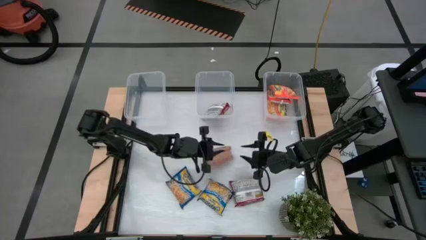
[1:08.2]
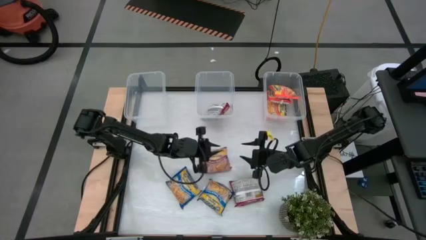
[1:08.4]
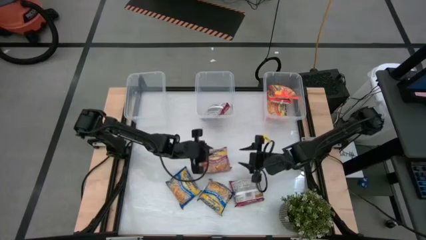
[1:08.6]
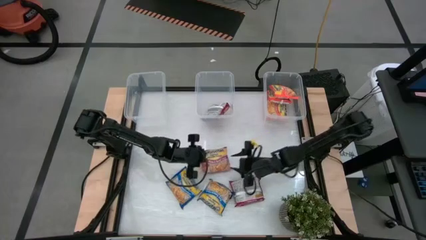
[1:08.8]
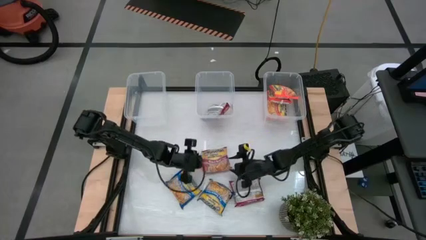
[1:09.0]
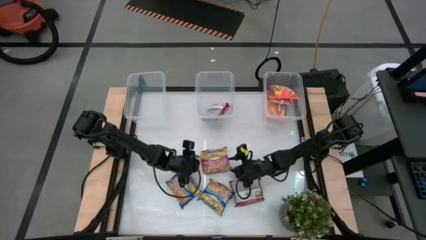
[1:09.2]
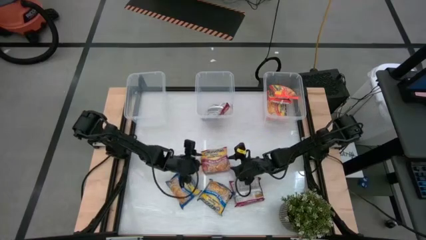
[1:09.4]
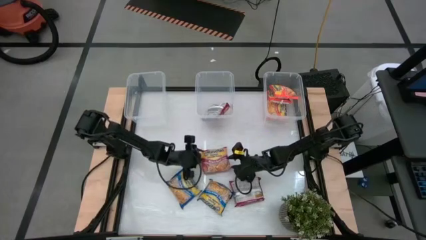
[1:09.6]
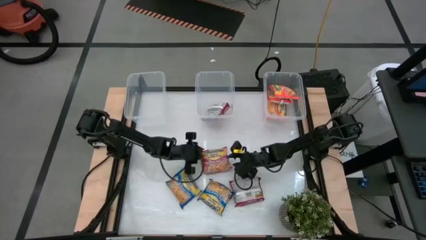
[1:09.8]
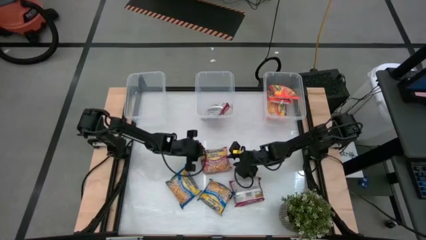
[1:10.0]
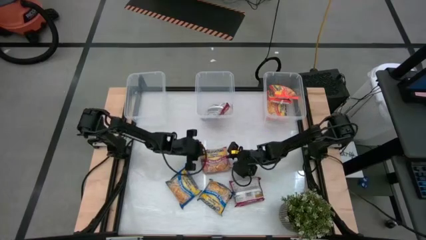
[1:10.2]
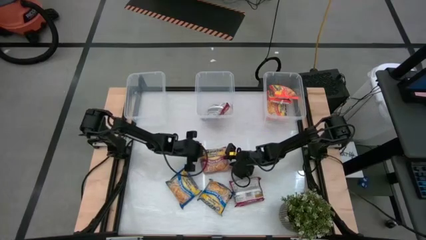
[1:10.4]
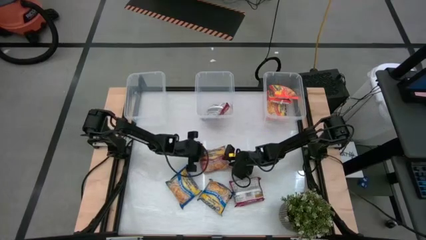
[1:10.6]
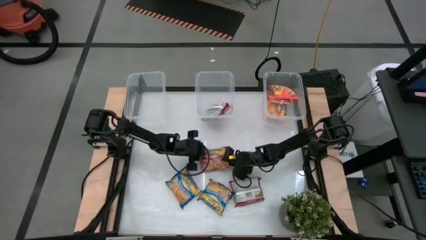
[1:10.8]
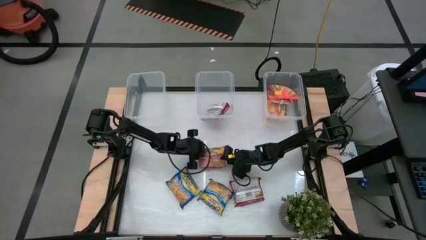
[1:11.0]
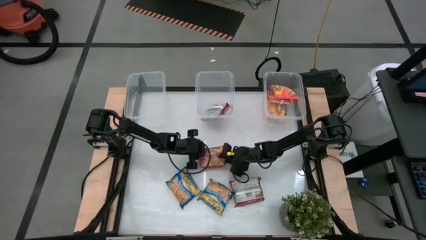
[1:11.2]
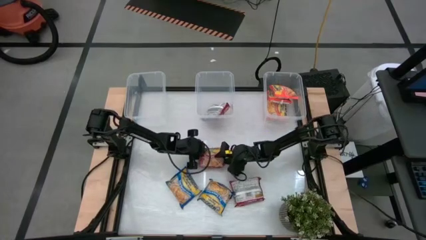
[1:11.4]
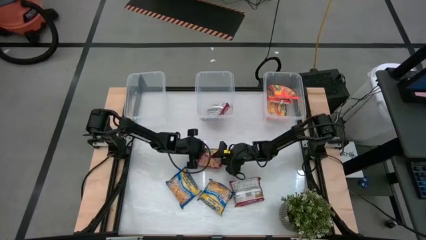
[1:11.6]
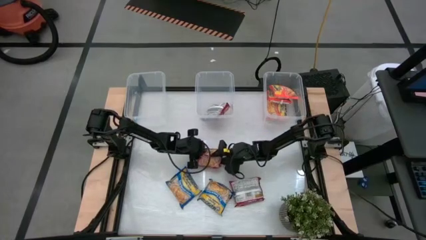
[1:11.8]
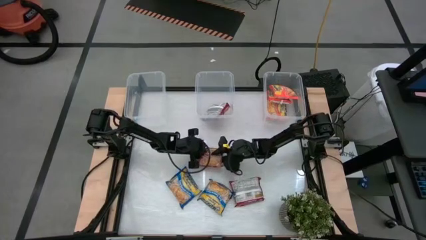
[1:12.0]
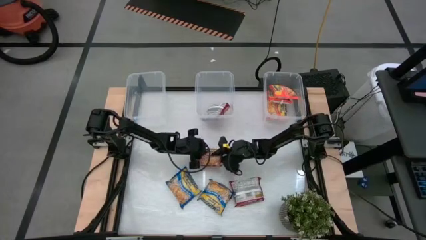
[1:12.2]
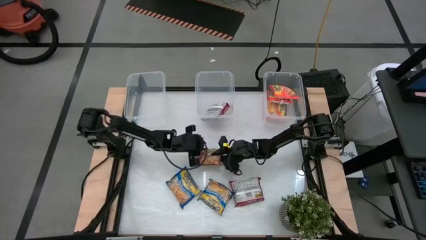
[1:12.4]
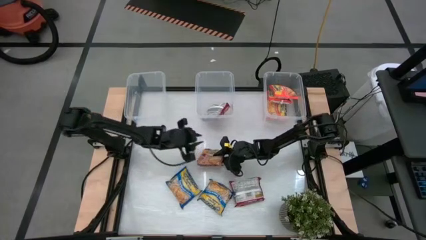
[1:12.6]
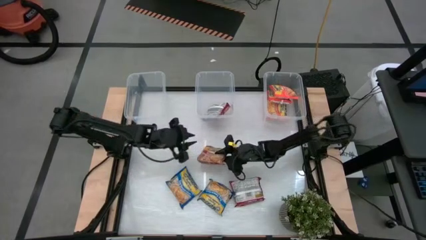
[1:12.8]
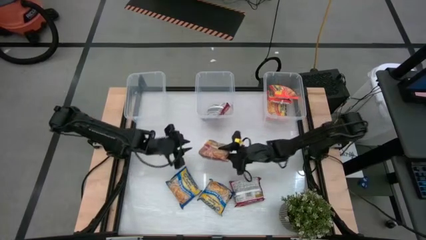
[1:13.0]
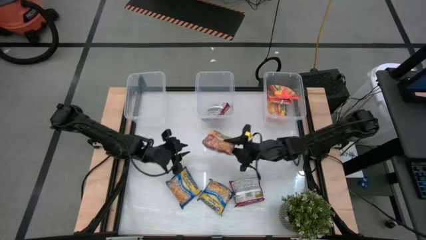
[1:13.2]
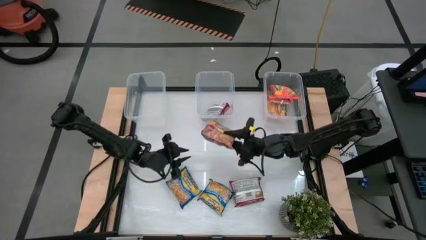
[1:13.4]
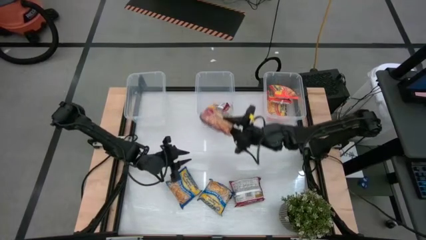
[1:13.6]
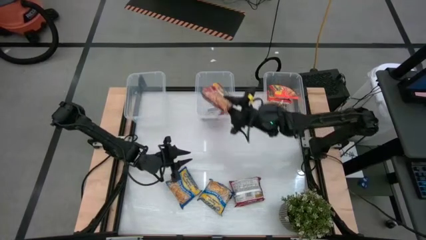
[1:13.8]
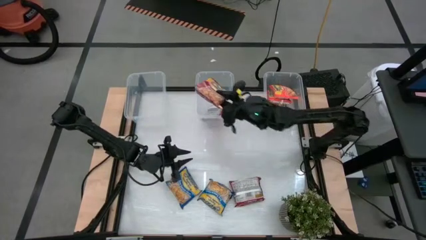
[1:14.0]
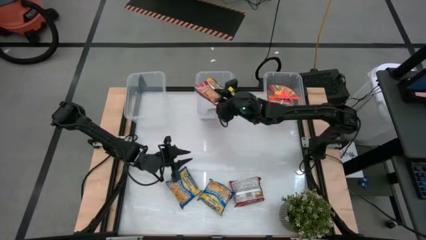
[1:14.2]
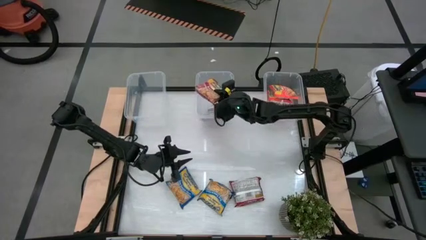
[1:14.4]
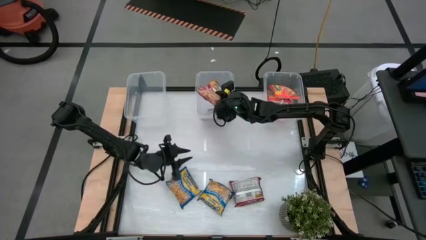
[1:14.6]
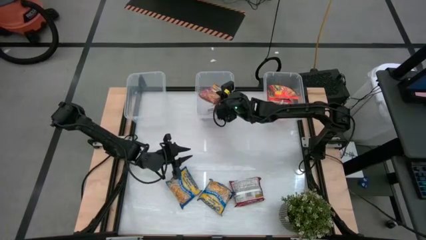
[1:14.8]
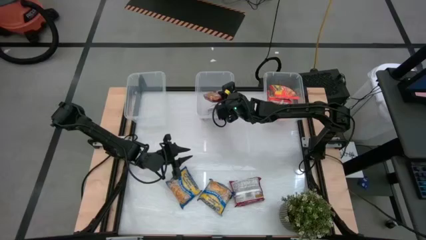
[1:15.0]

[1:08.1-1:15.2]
Task: Sort Maruchan noodles
Put the top red noodle pack into the middle transparent bin

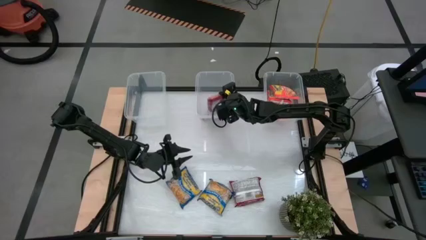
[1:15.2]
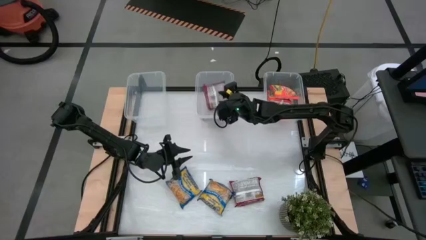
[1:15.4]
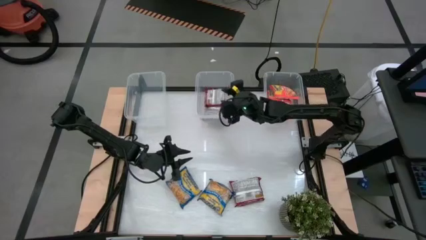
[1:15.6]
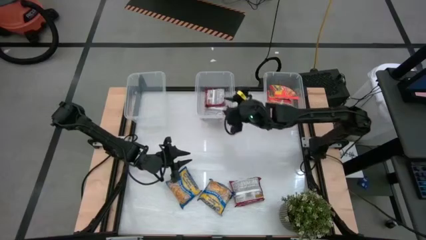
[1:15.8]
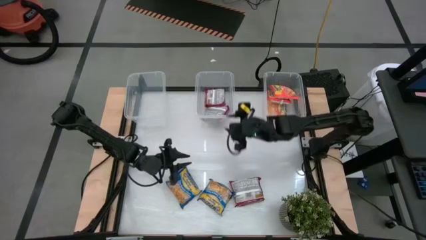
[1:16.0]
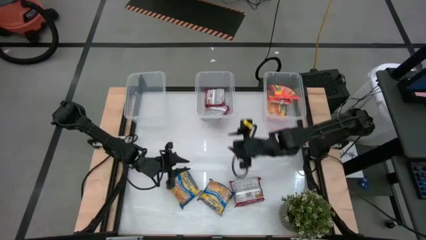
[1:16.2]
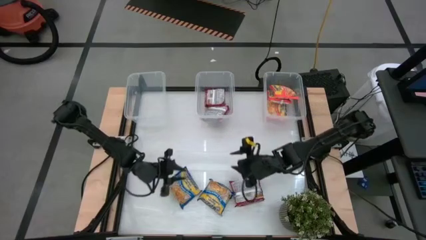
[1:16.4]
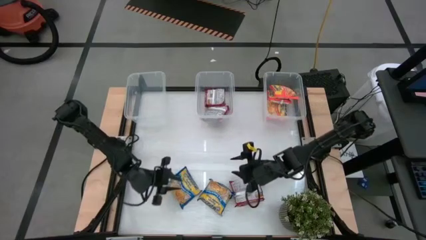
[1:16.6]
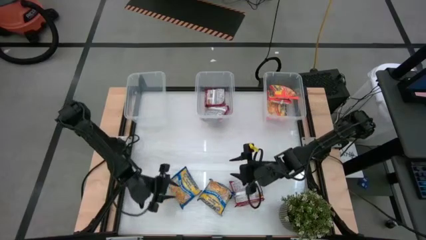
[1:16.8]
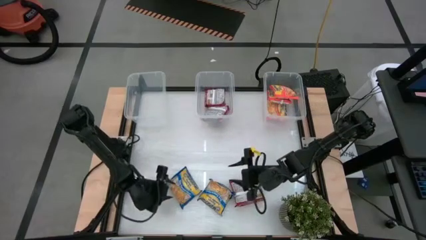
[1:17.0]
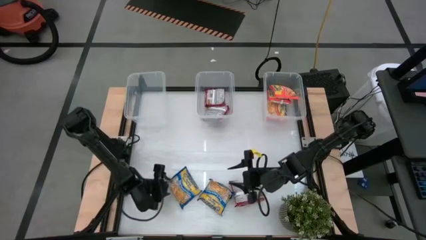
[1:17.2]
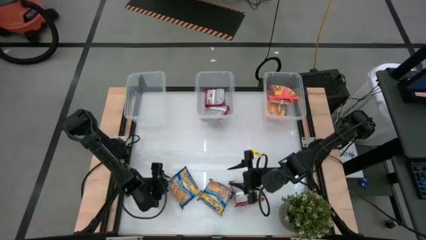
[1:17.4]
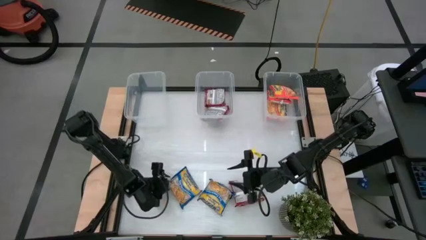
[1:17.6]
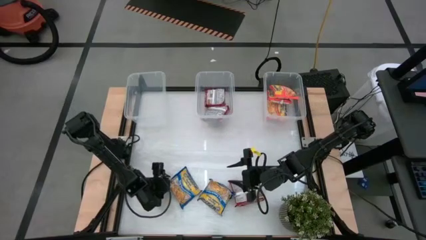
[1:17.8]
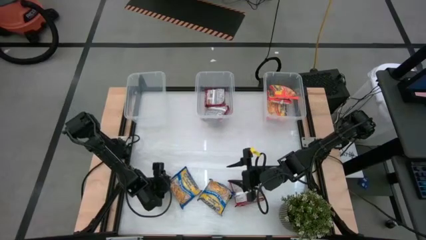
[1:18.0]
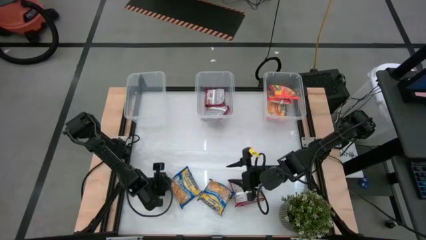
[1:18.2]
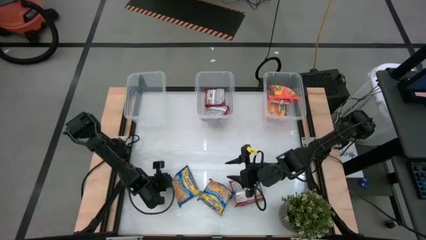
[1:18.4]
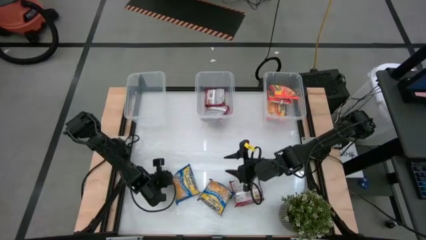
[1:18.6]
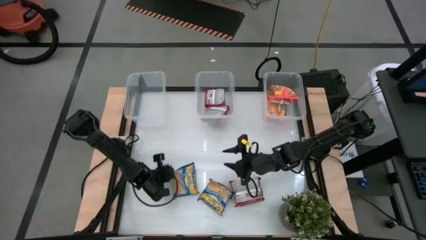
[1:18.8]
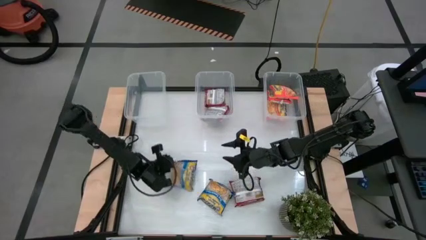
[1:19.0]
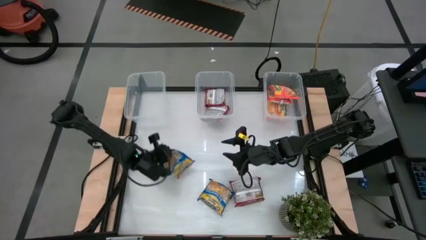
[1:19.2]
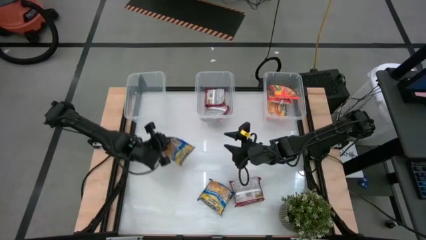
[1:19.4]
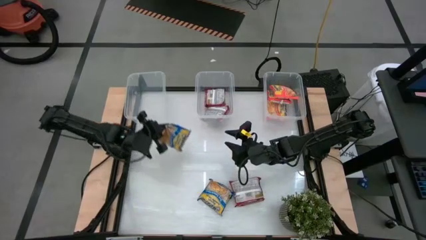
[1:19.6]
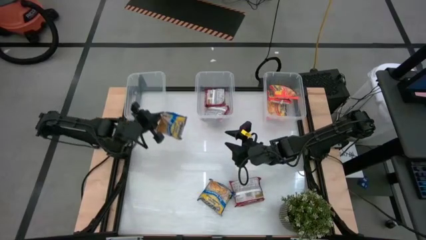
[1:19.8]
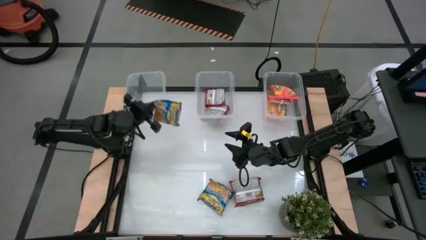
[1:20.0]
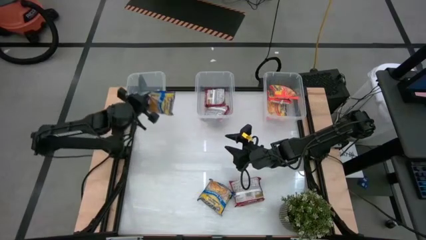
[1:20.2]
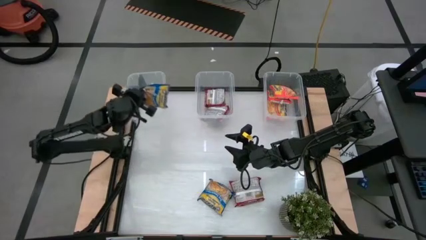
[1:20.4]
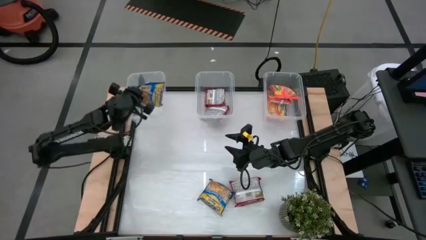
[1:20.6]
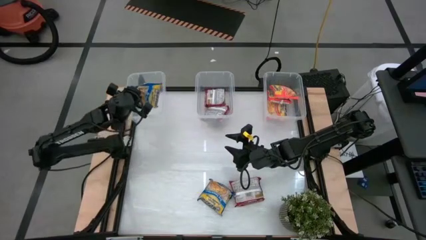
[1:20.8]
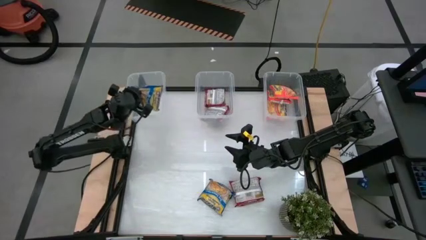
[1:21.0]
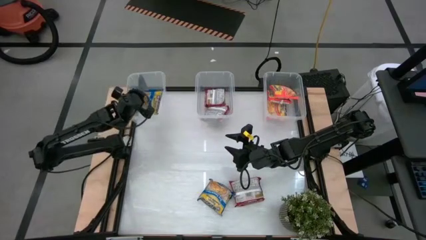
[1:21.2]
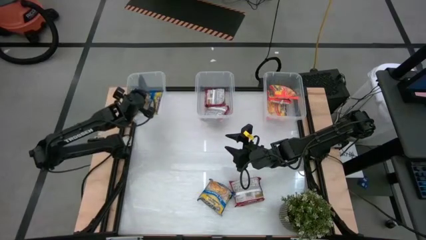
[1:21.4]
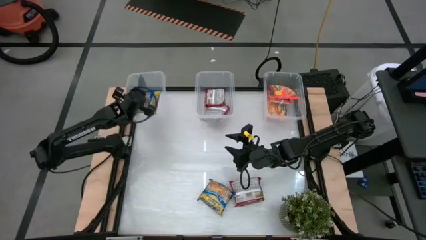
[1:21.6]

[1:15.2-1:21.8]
Put the left blue noodle pack into the left transparent bin

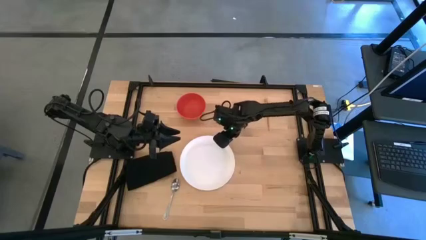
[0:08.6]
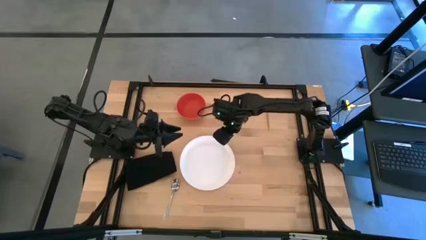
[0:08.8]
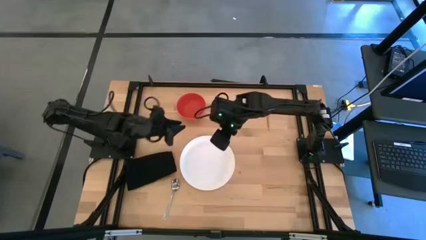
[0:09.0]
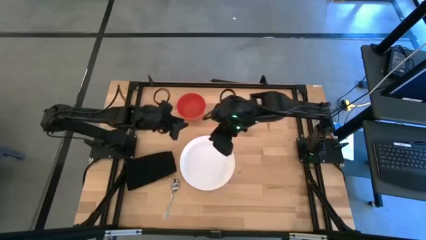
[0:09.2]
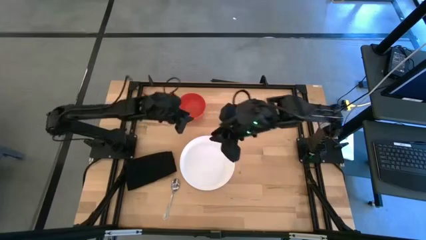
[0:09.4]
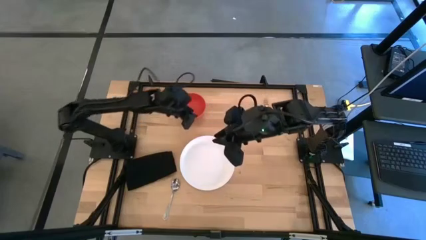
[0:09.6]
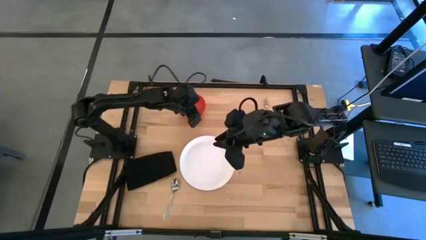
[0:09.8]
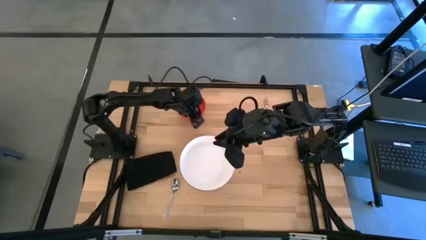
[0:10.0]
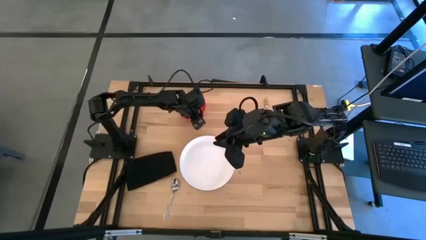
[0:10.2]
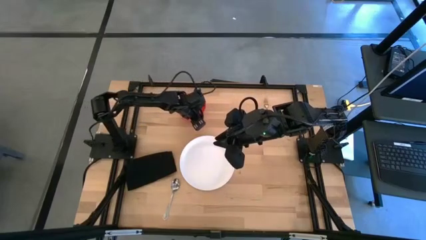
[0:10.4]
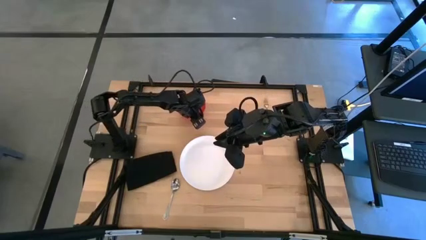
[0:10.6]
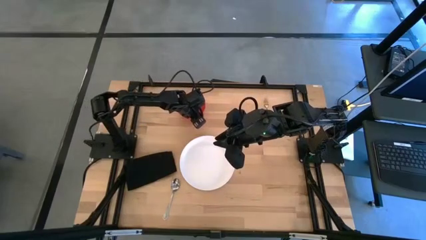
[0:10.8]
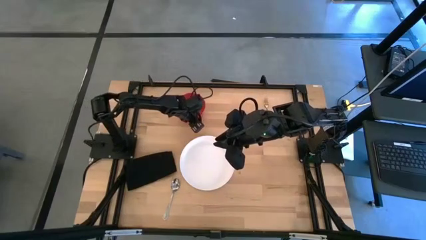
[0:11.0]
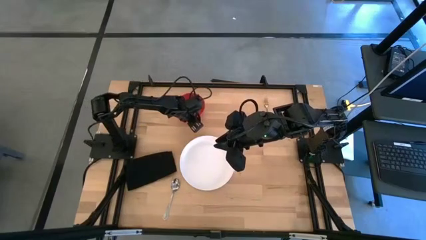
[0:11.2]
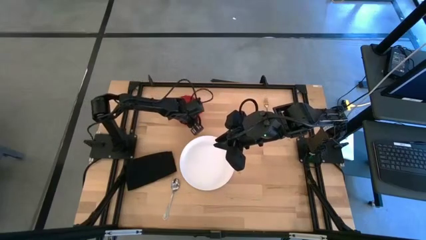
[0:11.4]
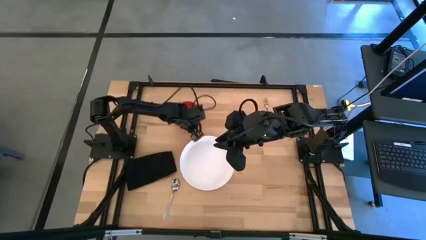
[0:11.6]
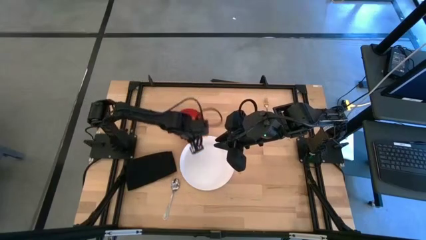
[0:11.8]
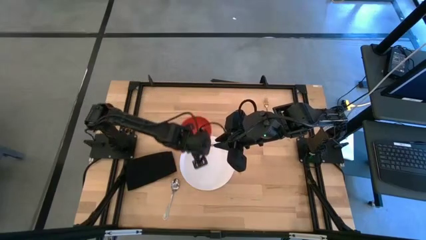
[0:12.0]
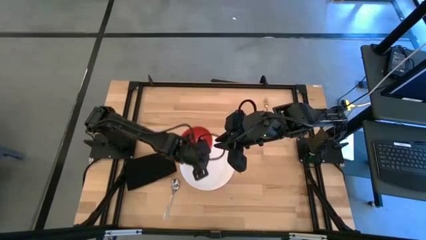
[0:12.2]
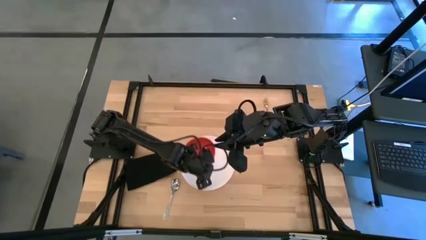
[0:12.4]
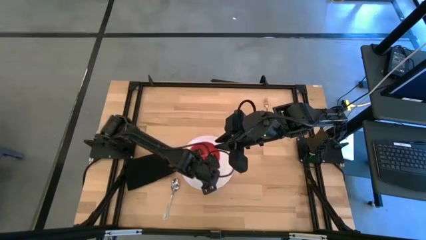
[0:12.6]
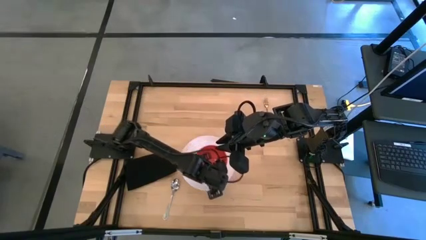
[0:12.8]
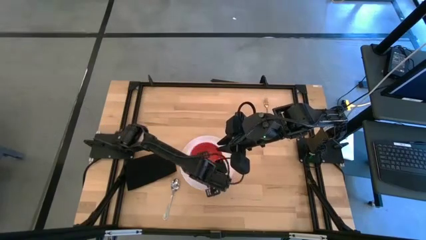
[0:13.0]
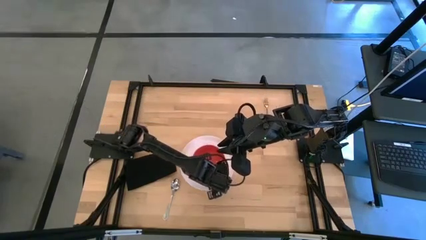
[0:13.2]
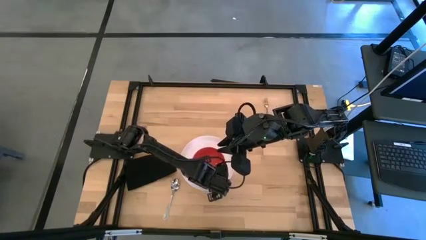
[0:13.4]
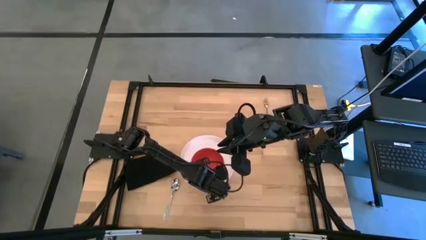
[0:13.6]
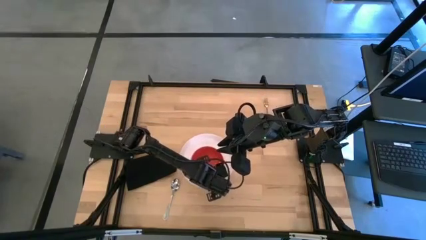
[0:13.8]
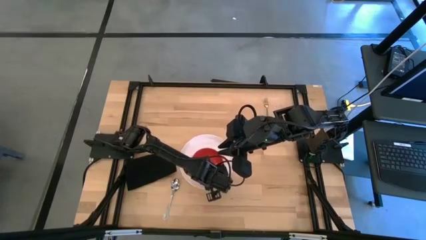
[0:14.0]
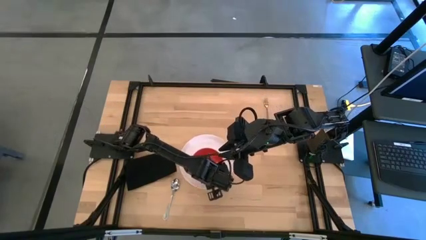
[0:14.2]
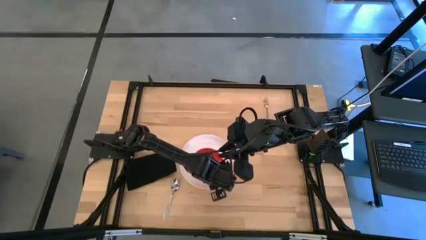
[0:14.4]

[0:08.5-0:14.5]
Task: Set table place
Put the orange bowl on the white plate
